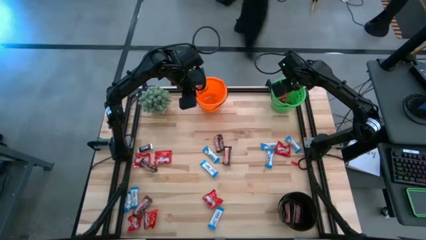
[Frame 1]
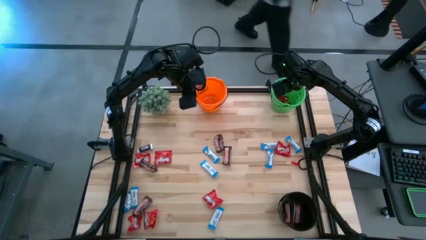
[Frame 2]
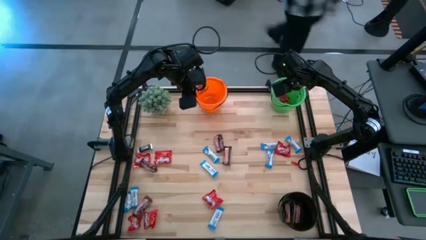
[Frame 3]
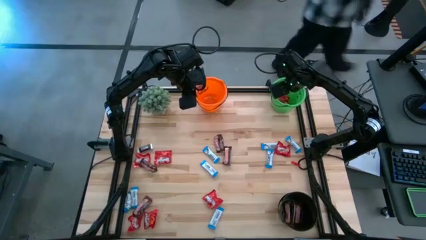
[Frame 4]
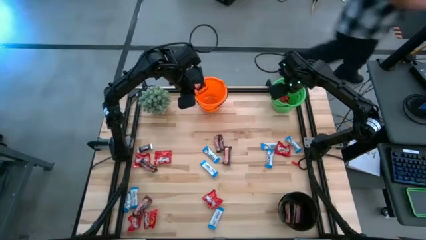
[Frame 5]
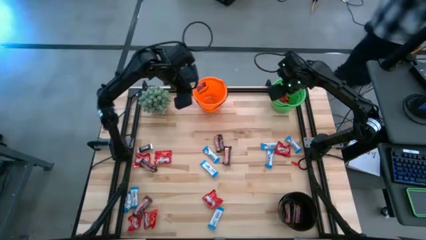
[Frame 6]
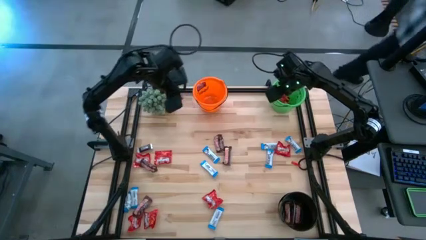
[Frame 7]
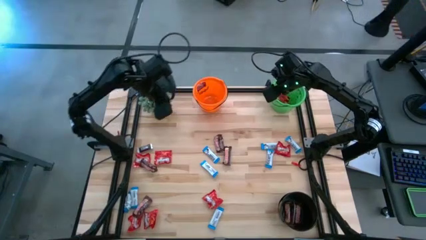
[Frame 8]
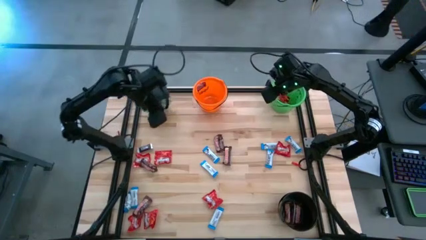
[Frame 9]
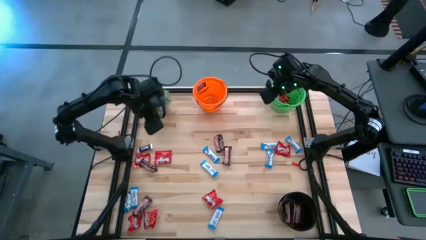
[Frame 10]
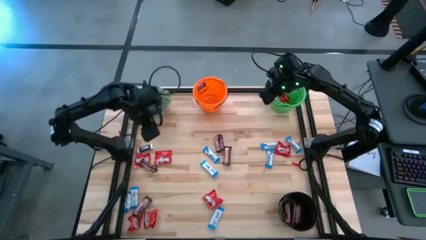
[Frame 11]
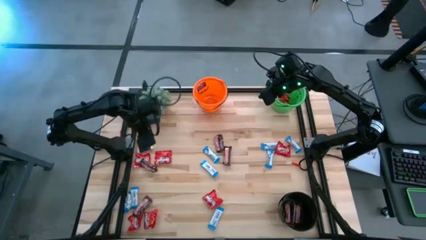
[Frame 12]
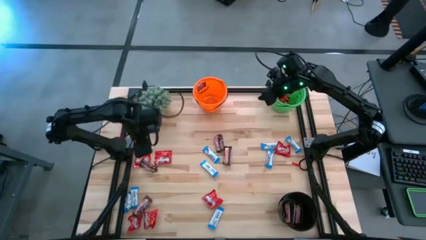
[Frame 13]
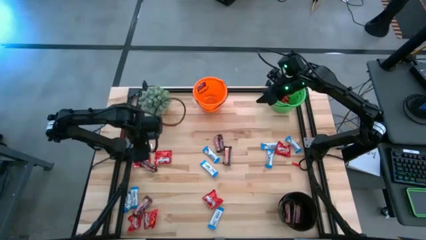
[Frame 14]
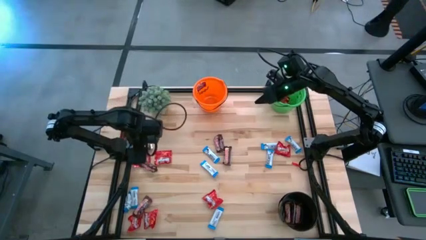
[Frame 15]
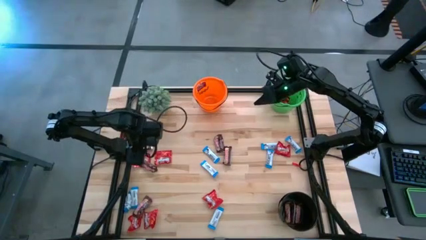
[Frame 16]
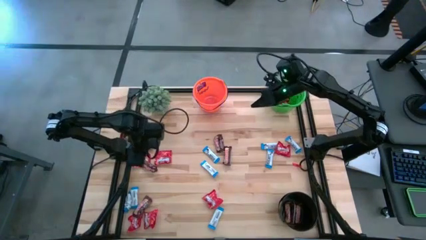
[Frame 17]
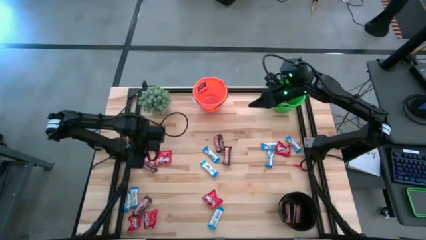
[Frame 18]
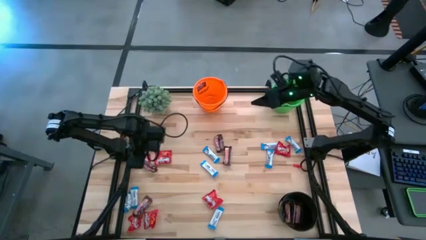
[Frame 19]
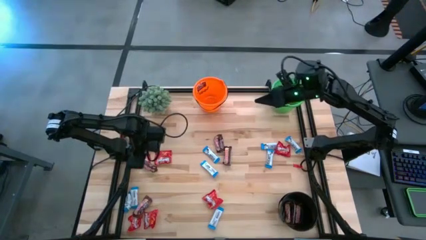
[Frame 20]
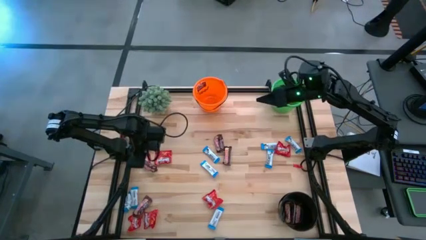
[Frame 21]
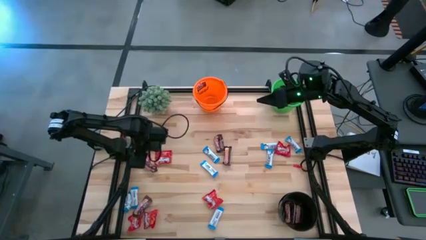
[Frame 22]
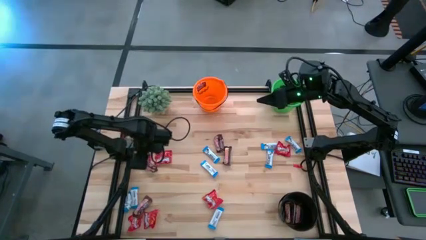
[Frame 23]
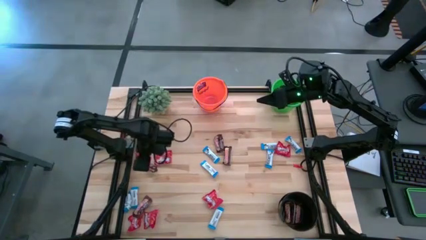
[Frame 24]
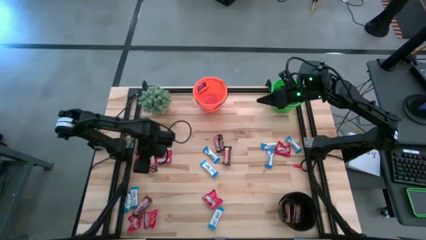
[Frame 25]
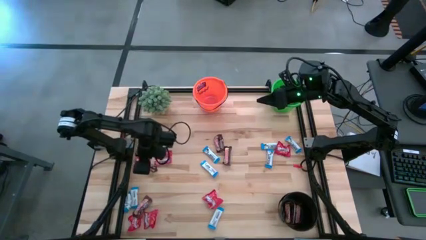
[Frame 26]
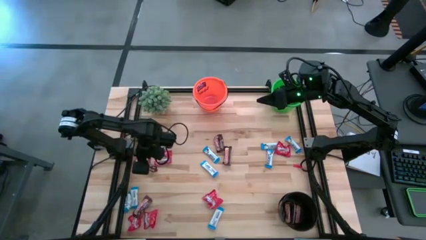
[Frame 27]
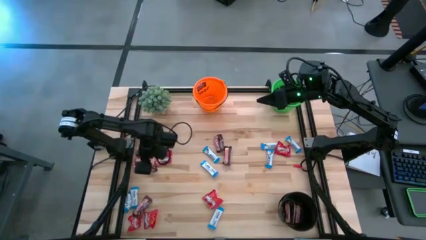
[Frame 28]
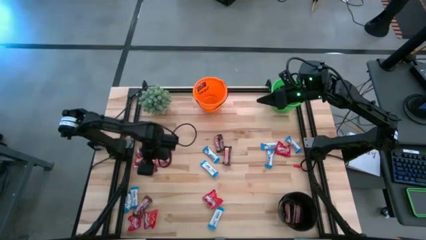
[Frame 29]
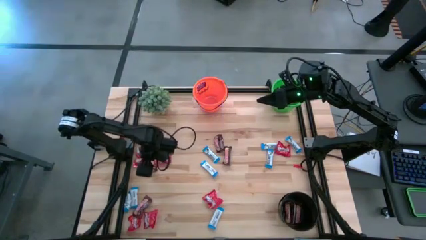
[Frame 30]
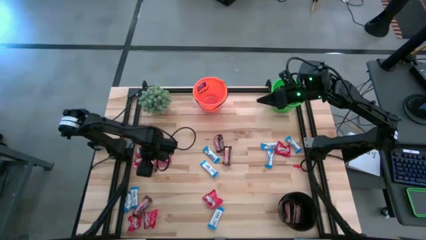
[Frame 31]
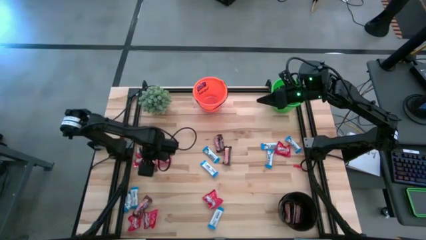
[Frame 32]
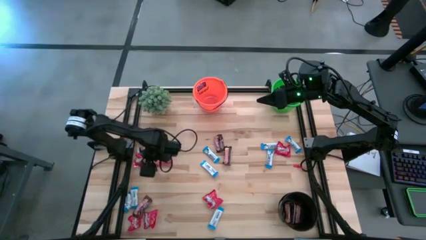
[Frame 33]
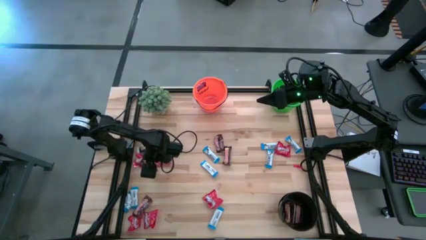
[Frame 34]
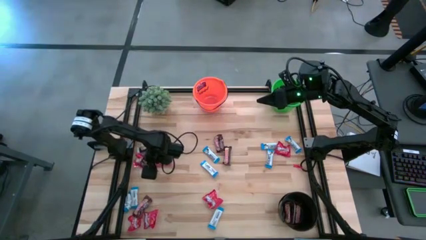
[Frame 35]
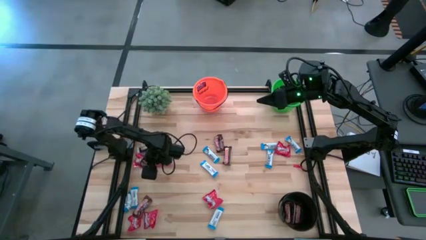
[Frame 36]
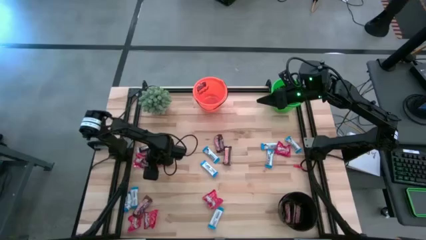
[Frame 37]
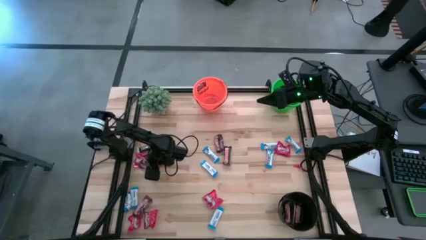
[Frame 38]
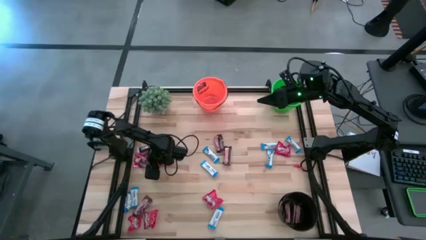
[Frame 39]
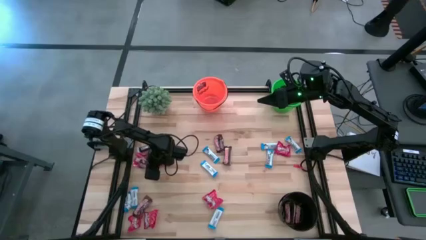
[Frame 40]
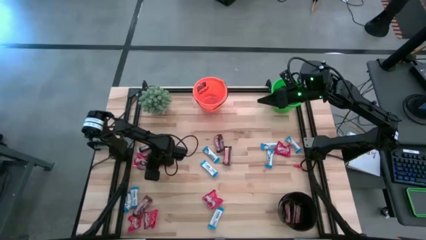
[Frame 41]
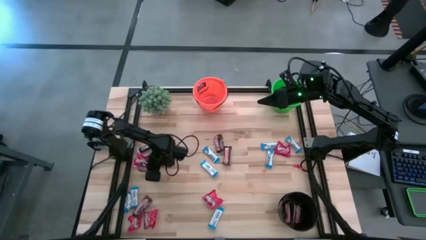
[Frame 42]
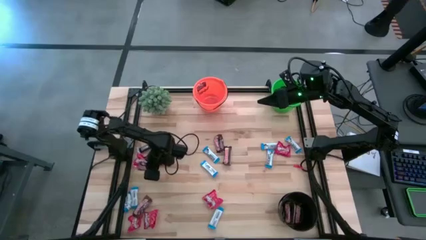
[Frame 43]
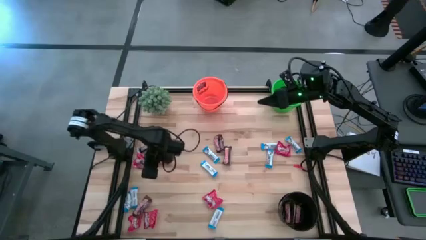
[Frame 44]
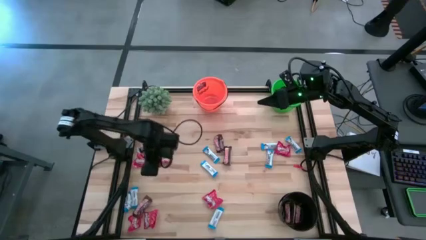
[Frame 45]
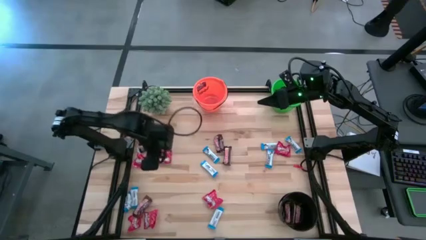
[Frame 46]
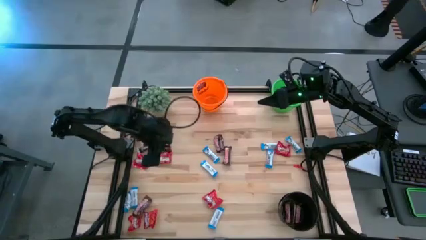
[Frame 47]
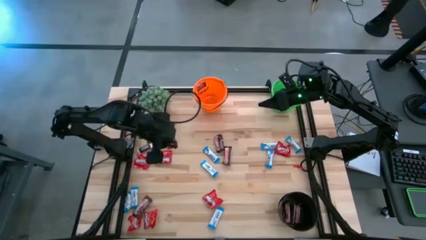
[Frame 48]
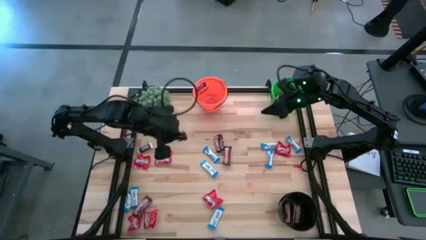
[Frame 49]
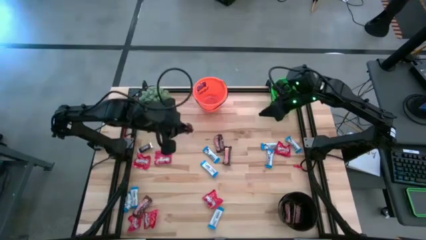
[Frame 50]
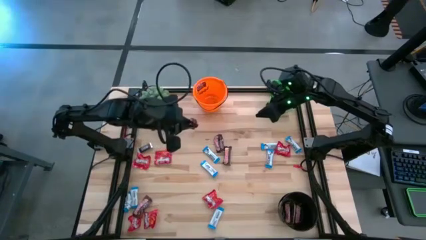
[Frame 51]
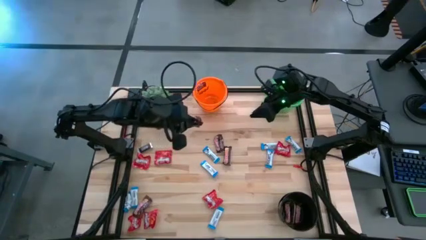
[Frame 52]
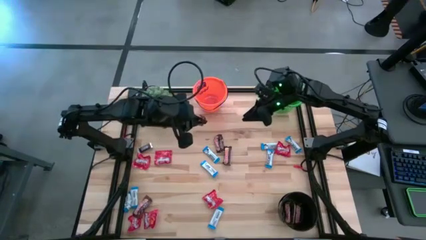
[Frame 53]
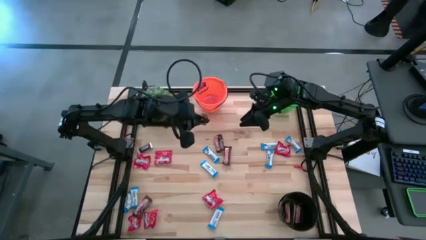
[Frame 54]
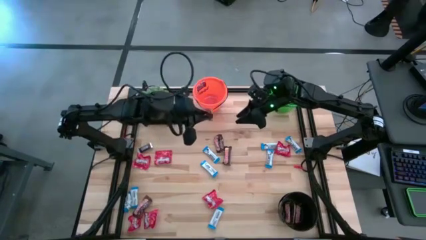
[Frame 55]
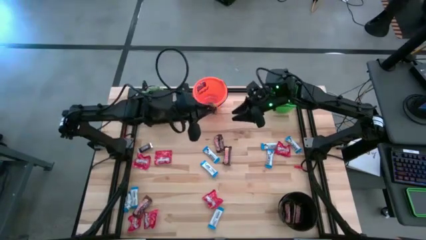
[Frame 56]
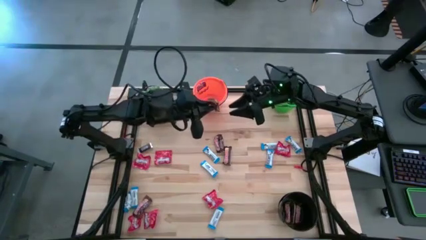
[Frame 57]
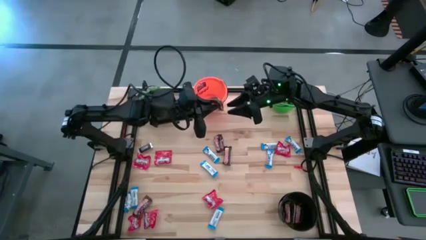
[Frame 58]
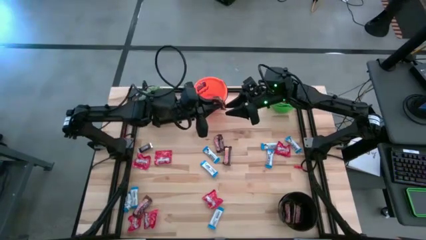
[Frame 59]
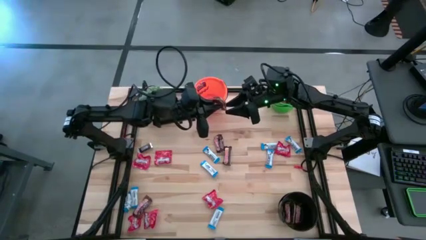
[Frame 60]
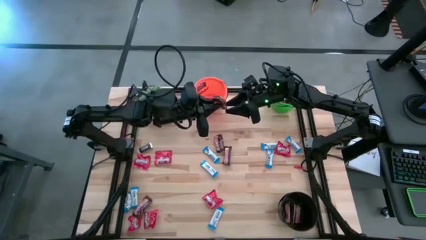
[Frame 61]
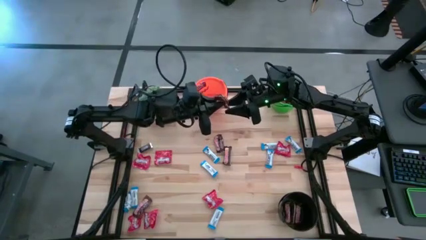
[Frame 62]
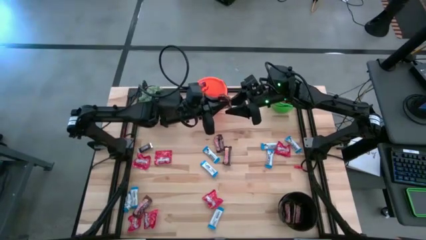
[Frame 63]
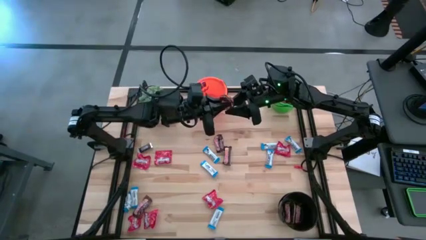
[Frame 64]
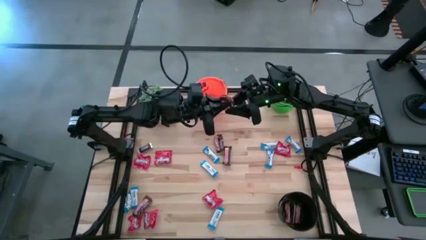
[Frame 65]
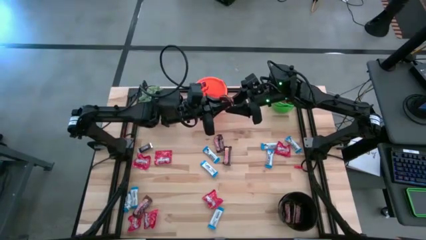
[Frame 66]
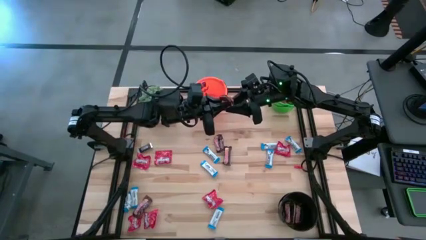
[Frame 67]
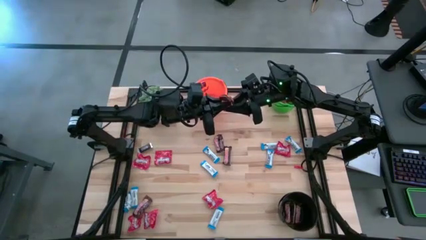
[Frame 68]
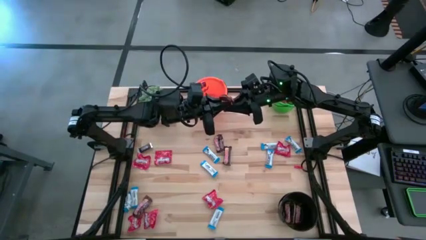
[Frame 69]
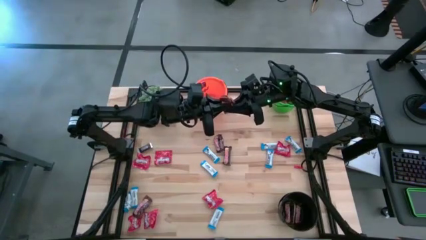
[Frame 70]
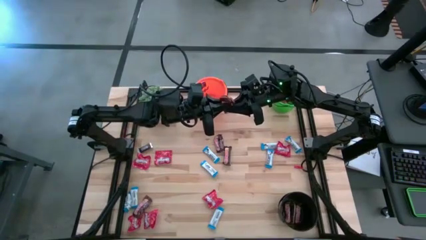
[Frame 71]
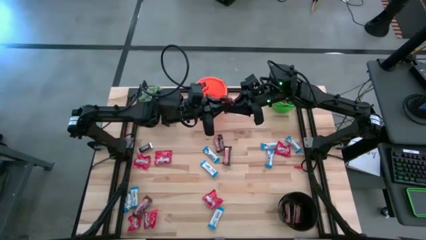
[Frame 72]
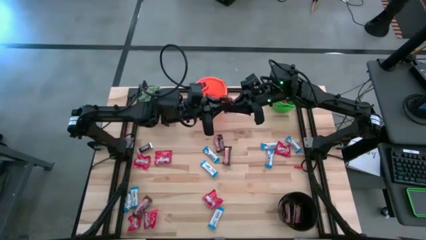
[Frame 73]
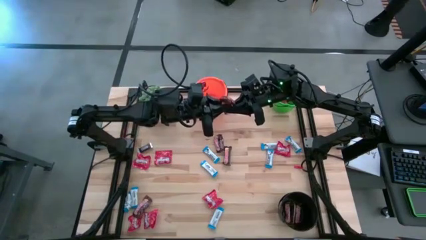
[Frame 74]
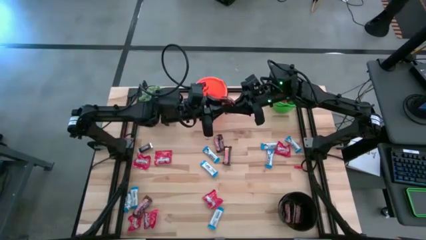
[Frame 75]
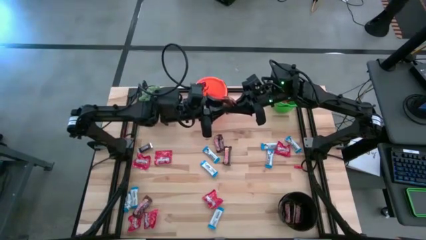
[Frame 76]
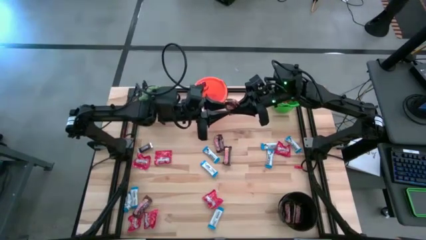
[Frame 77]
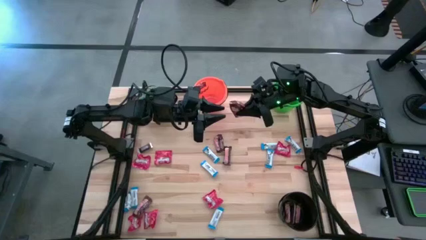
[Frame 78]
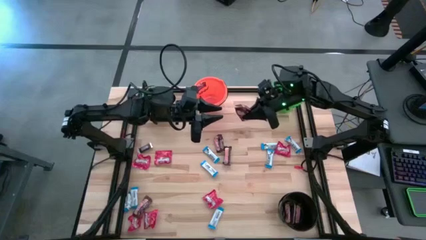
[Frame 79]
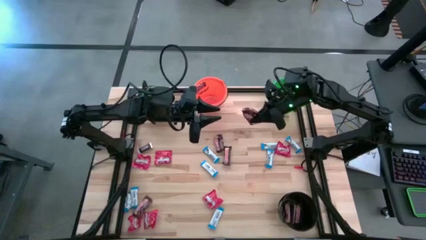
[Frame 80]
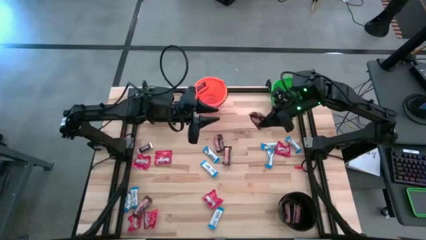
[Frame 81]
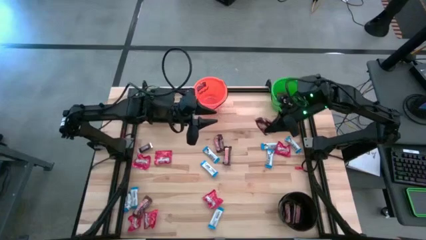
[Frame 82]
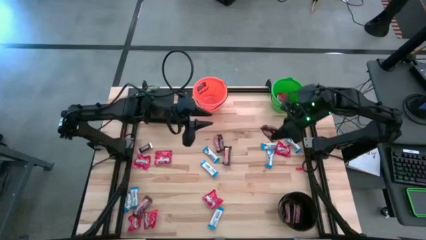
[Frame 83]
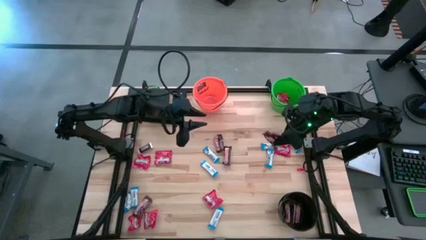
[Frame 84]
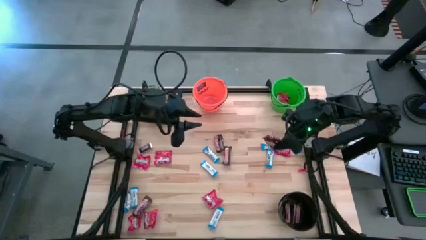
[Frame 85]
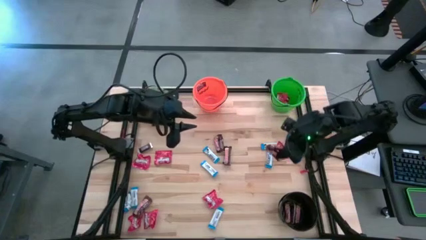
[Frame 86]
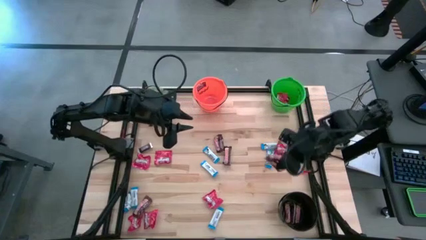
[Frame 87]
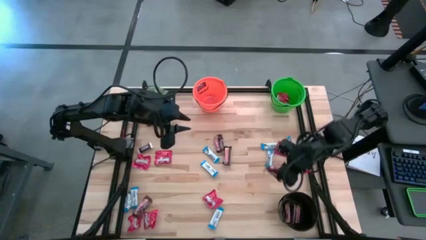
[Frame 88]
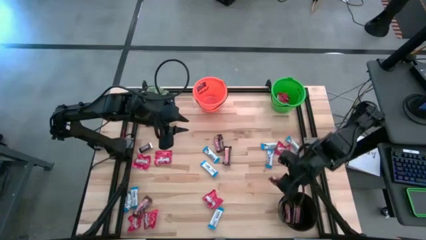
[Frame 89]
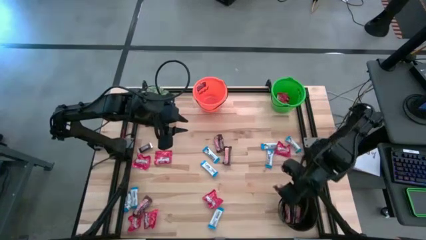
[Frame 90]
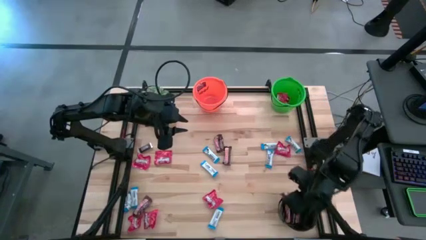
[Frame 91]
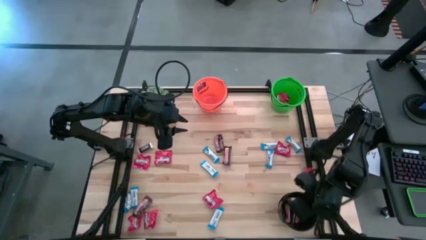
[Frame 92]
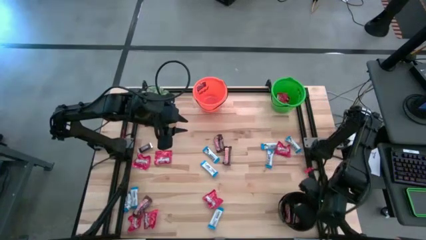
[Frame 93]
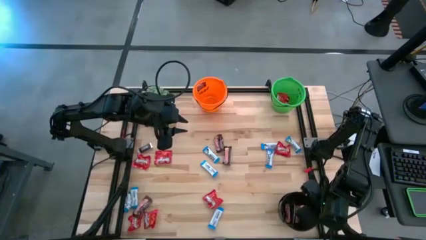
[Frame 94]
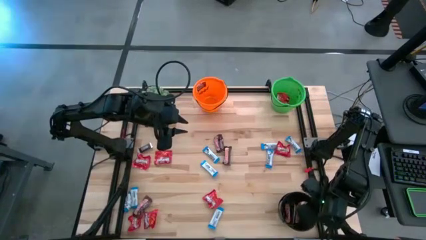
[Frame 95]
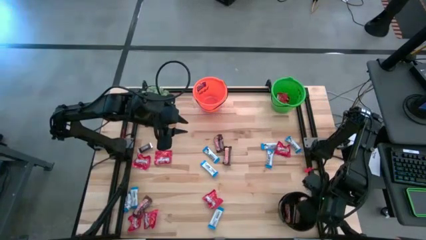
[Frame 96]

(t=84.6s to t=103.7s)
Task: Organize candy in baskets
Put the brown chocolate bar into the black bucket
